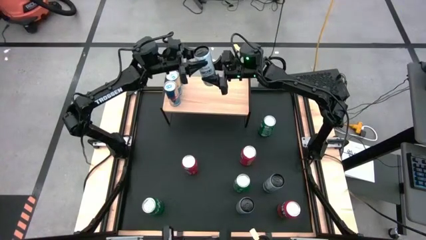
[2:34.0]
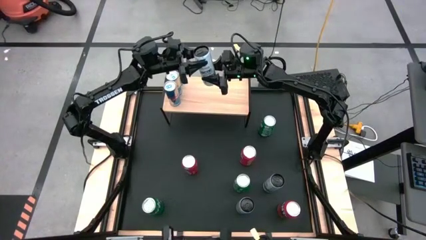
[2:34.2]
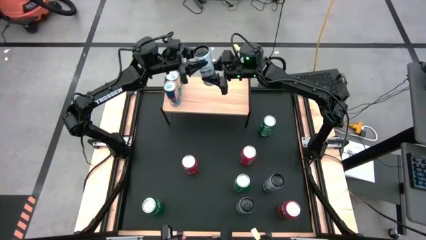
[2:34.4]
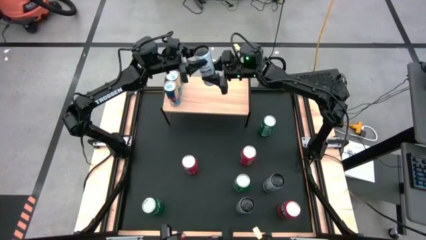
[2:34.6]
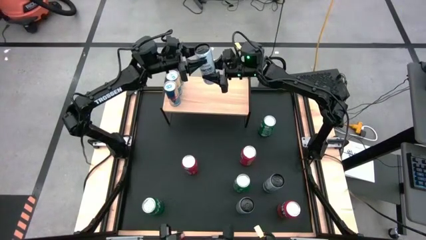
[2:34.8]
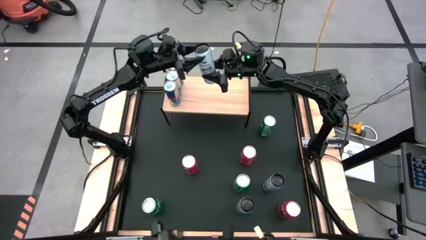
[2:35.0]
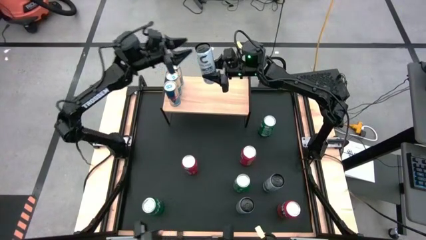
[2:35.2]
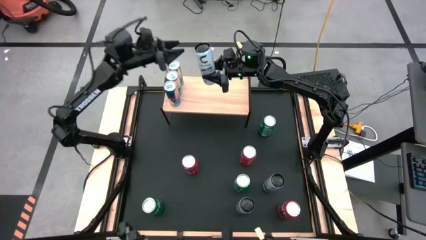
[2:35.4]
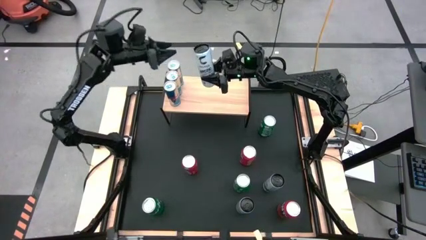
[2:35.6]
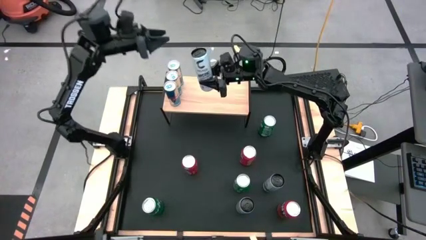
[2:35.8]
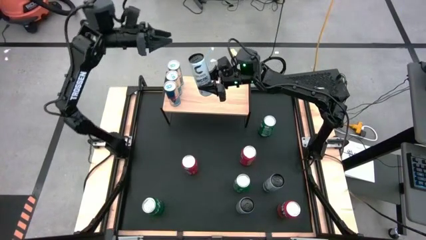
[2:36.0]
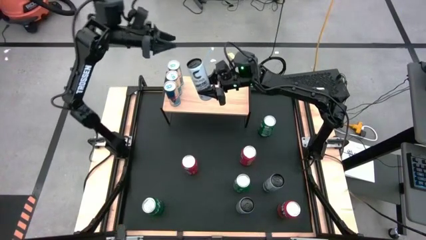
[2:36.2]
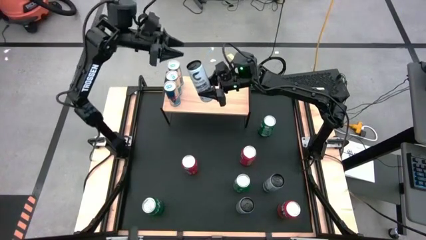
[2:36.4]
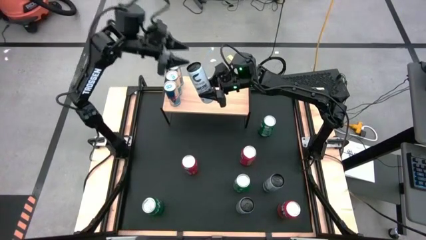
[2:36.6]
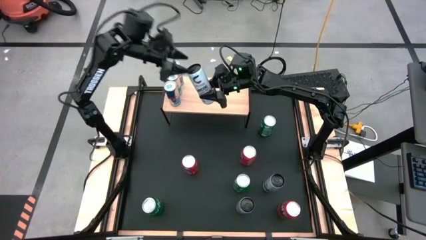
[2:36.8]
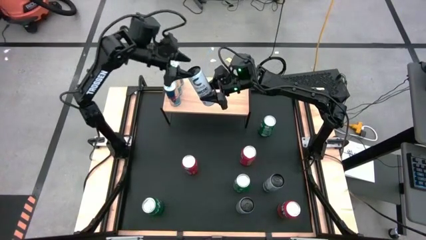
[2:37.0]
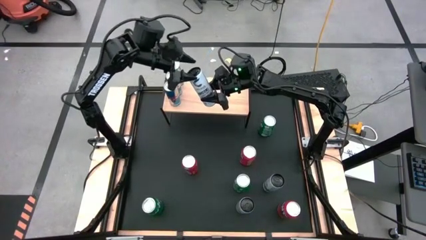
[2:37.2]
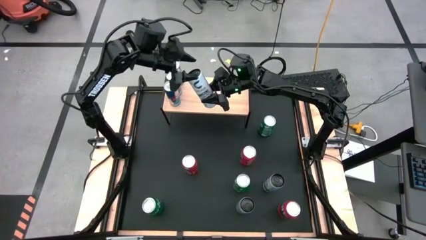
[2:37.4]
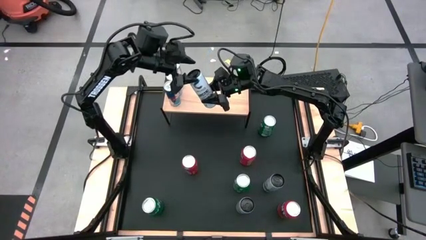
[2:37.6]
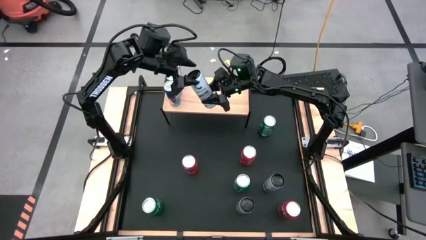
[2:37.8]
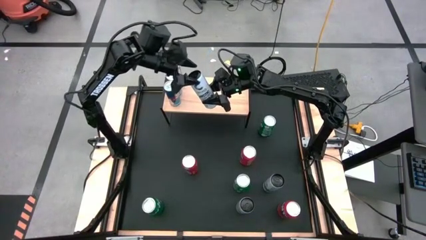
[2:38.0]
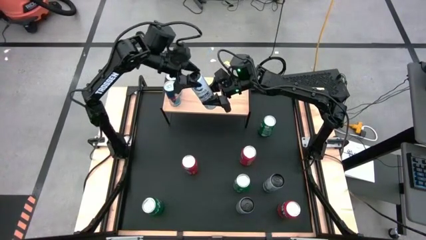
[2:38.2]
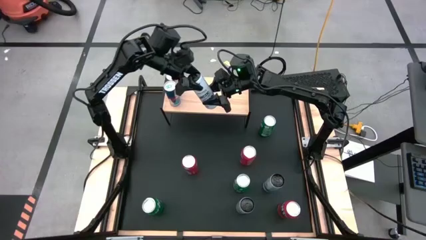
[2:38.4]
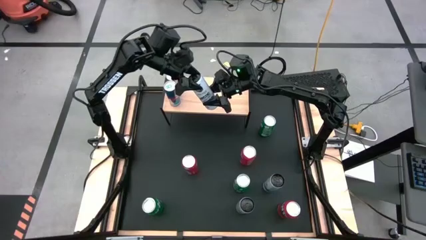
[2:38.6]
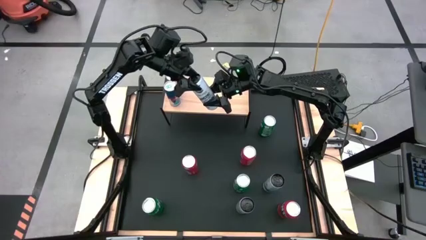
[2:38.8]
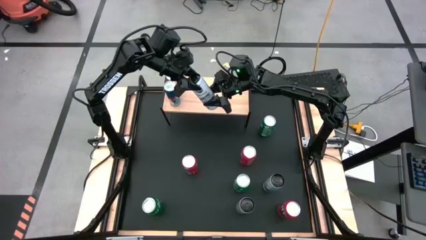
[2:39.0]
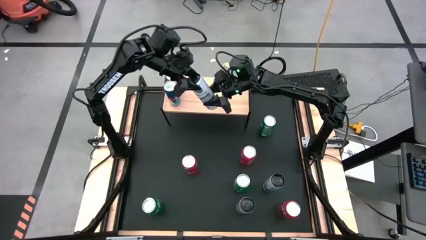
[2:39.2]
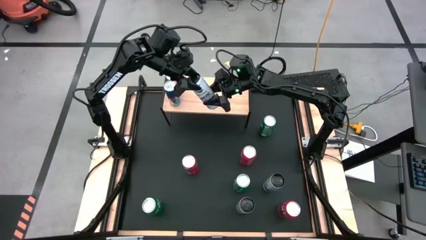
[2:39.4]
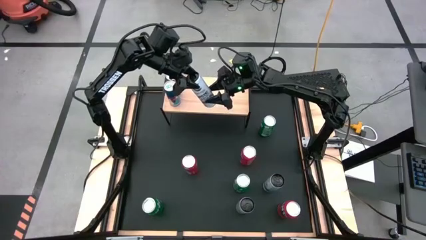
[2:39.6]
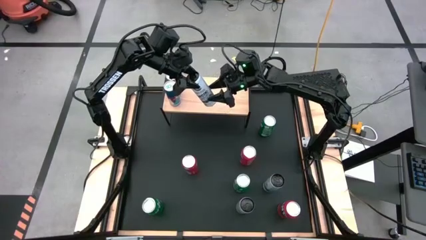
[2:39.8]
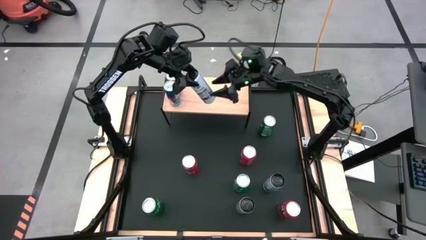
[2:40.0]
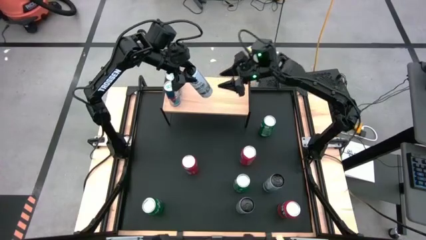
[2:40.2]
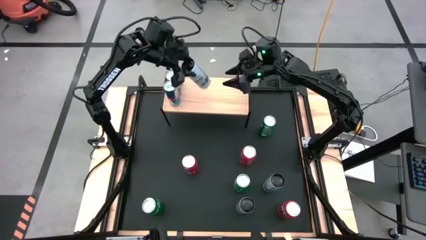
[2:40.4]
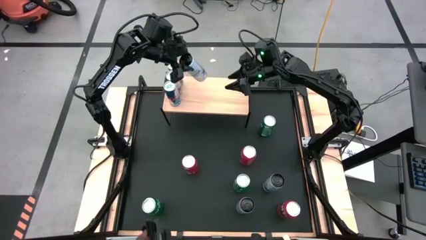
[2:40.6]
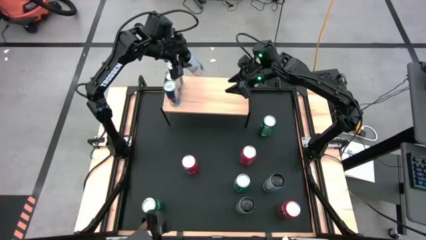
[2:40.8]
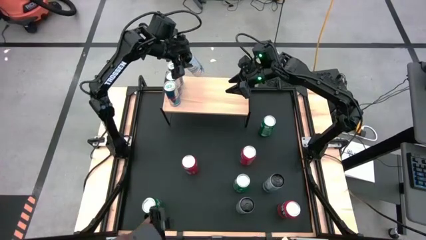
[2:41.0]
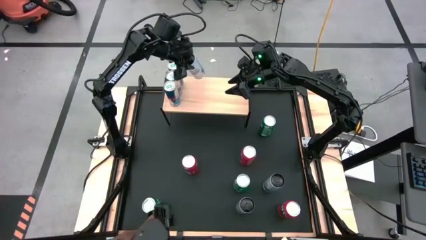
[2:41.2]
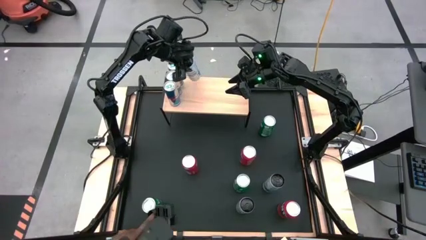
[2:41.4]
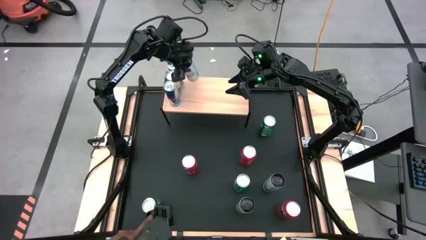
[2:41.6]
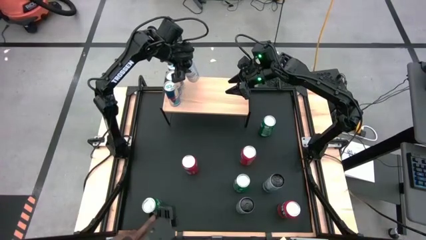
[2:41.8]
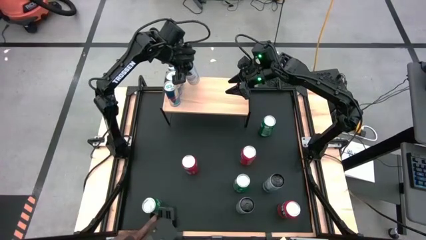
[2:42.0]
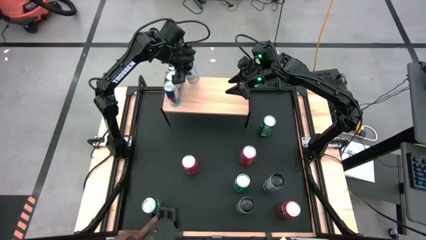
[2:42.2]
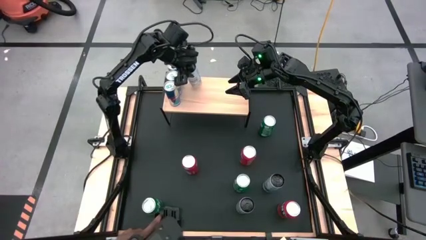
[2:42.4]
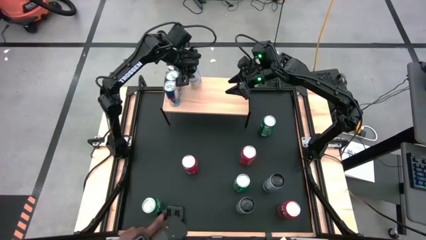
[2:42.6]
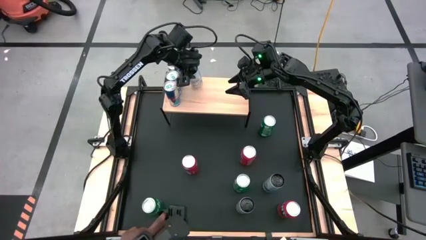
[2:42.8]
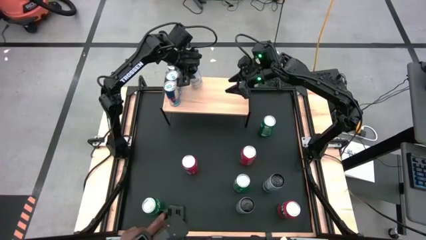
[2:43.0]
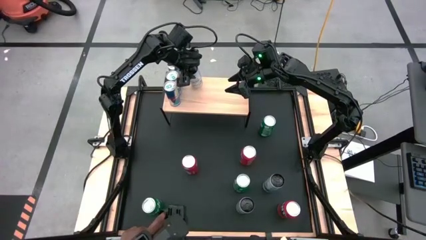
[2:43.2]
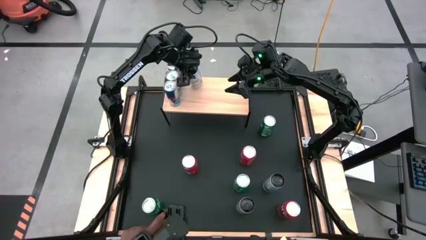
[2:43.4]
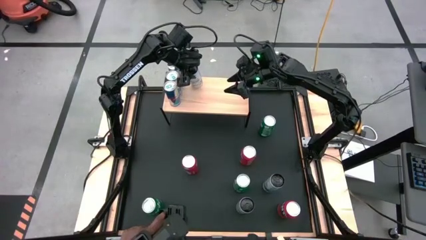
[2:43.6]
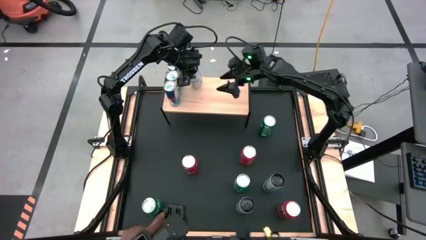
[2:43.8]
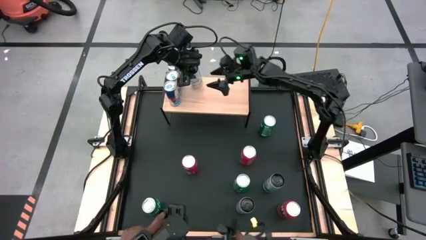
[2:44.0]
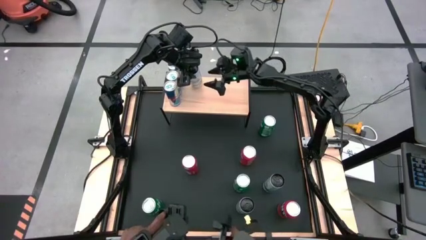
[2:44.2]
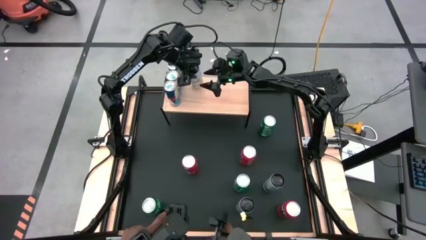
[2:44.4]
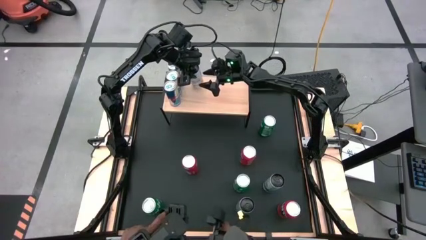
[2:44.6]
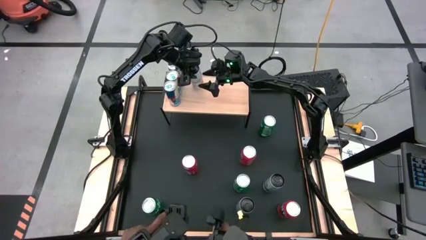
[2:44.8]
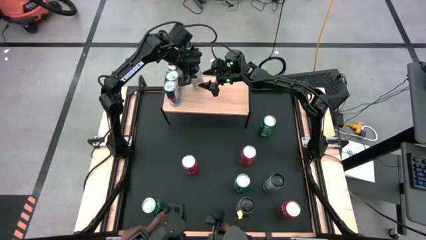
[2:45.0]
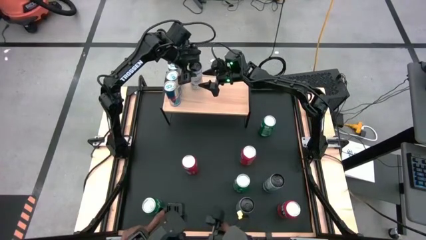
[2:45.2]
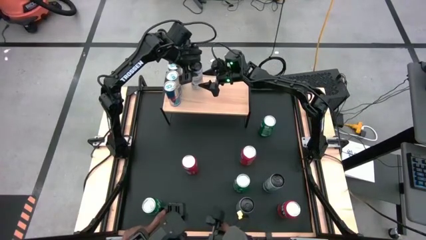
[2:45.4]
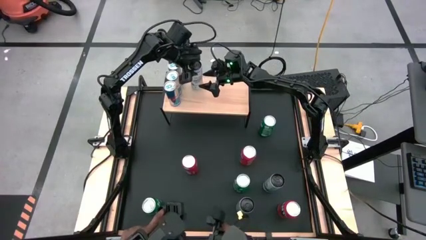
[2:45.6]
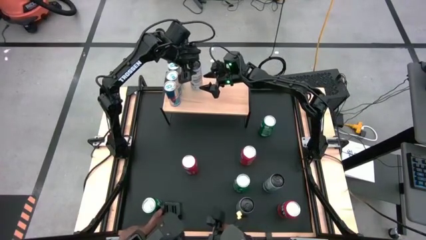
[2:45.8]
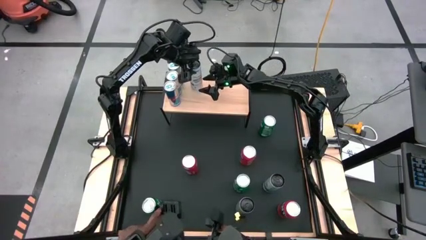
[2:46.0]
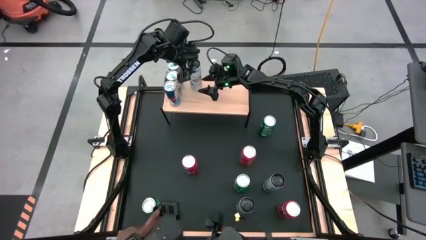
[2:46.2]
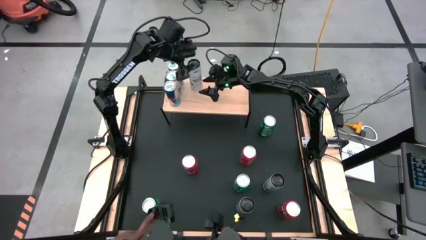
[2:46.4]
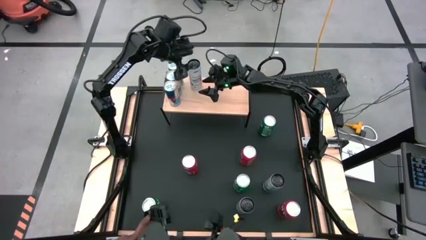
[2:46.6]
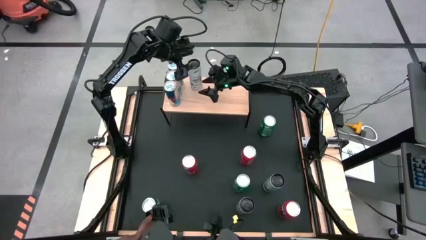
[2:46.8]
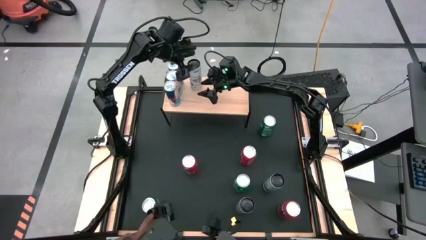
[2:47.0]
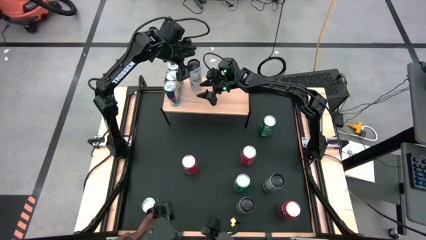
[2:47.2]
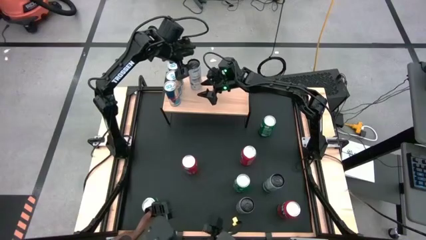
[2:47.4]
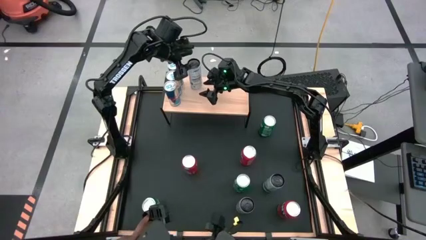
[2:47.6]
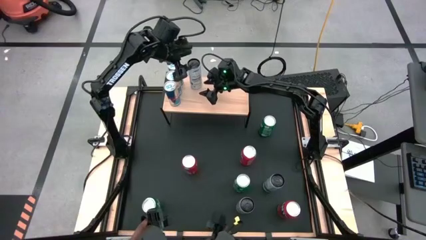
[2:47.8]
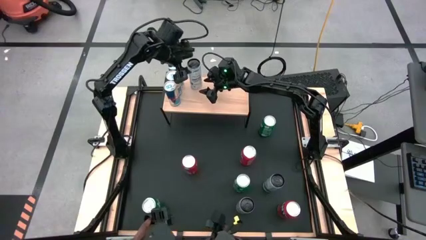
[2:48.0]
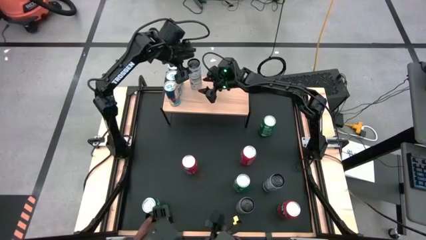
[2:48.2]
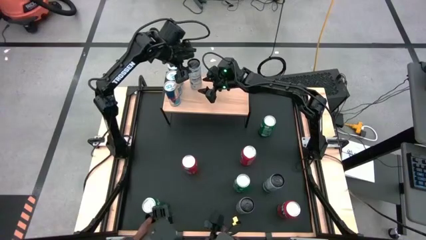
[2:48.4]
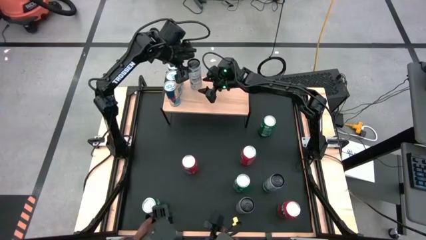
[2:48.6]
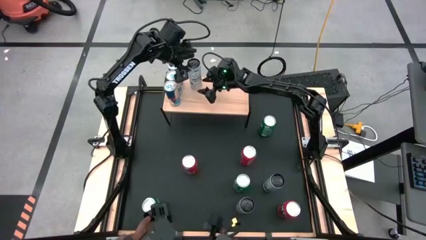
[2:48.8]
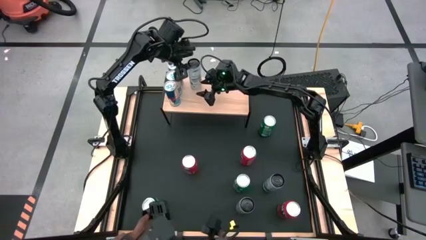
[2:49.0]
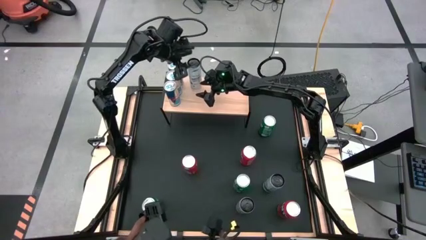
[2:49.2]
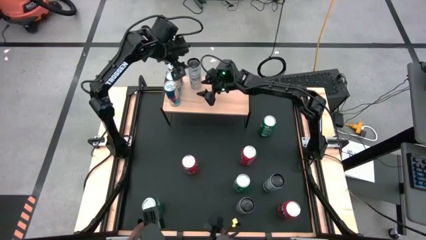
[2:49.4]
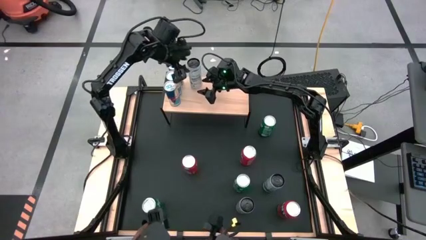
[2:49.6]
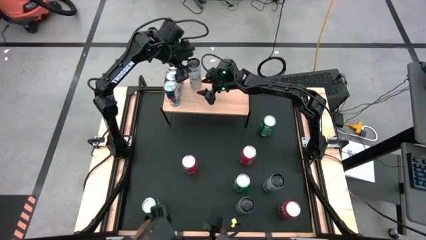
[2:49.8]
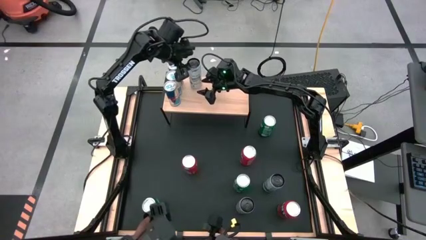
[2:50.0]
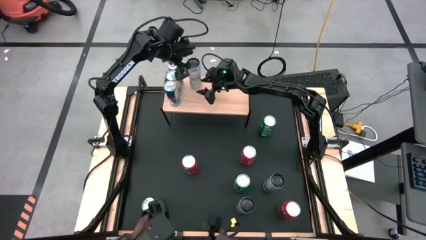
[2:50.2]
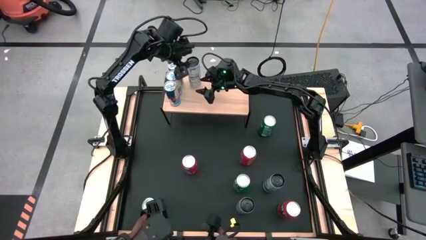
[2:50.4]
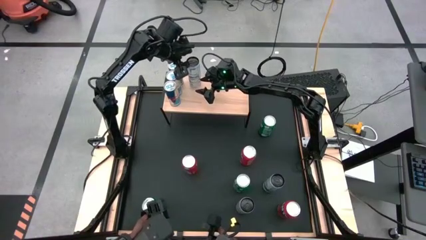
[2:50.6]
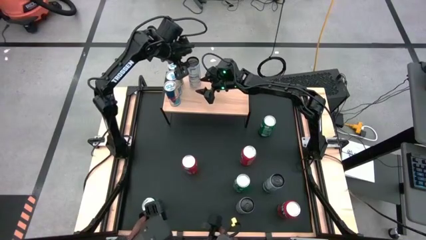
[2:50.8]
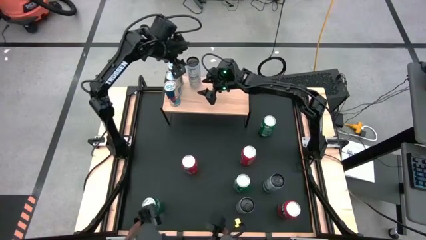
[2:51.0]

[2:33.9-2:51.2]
Task: Place canned beverage on shelf
Put the top white-blue soda can on the shelf
